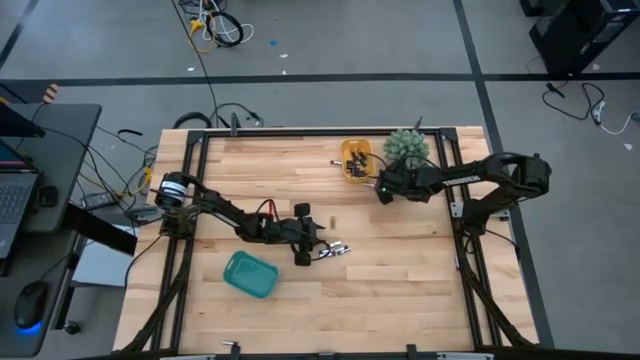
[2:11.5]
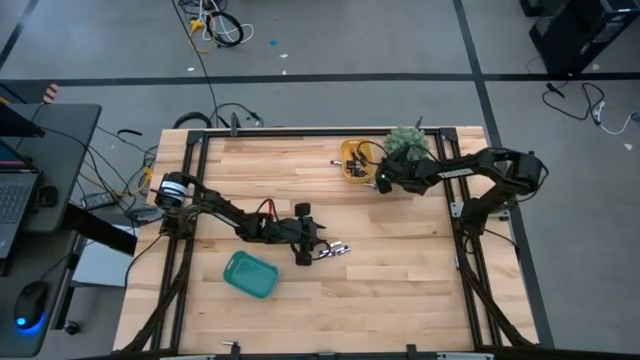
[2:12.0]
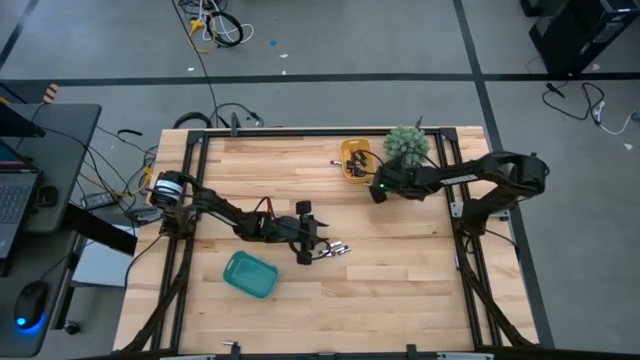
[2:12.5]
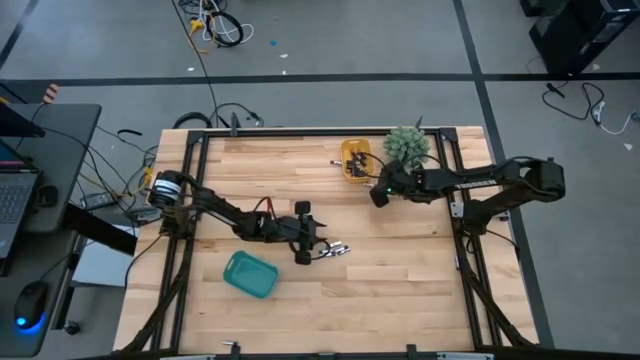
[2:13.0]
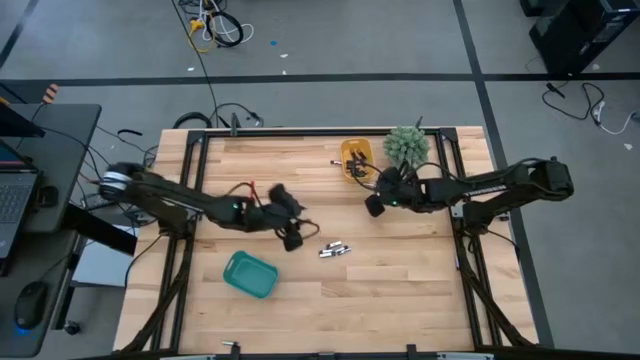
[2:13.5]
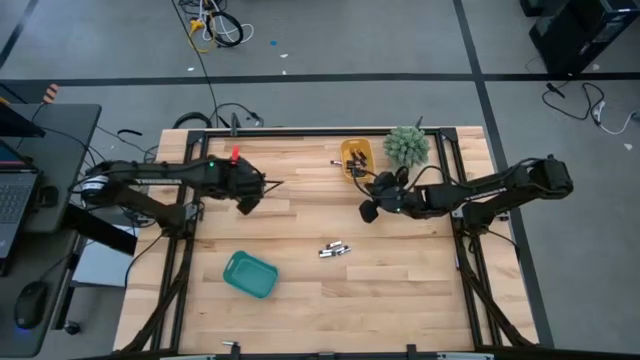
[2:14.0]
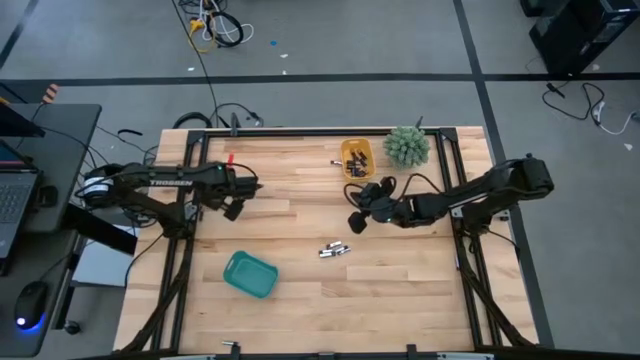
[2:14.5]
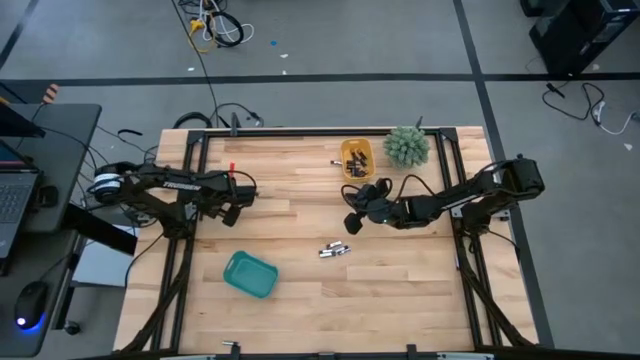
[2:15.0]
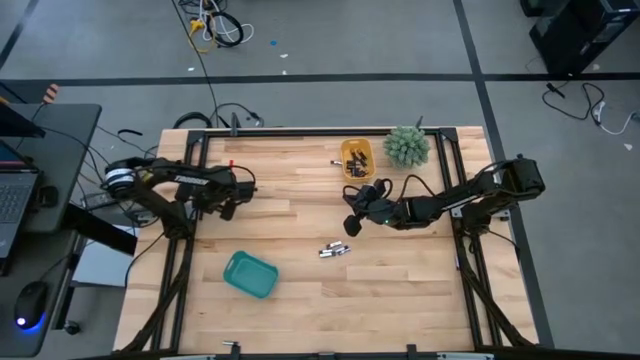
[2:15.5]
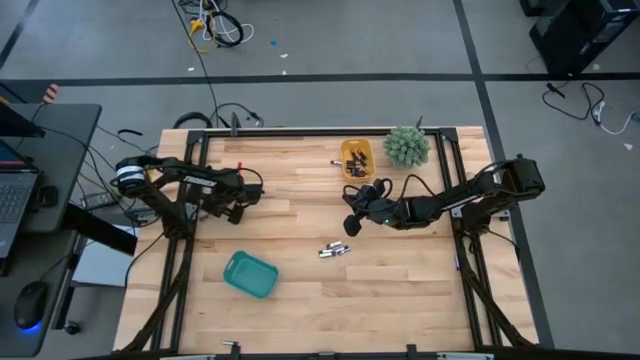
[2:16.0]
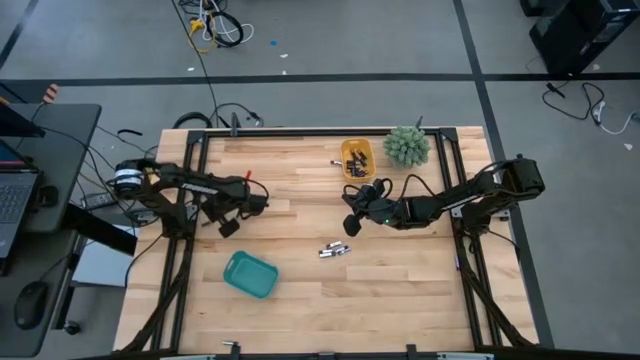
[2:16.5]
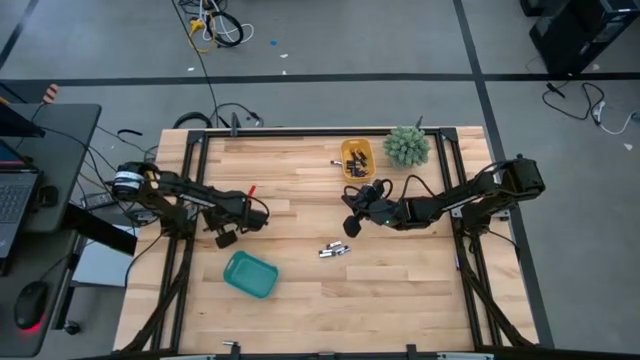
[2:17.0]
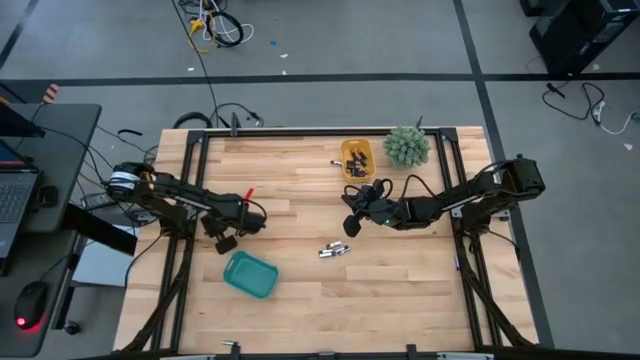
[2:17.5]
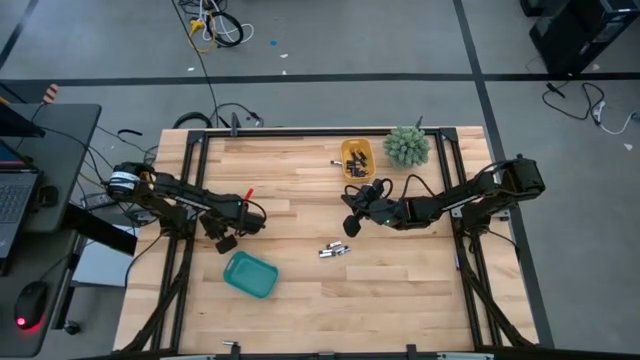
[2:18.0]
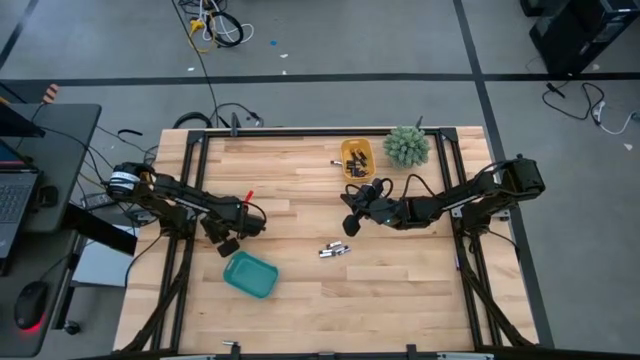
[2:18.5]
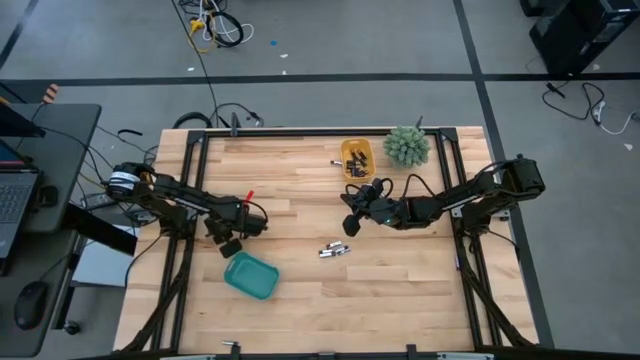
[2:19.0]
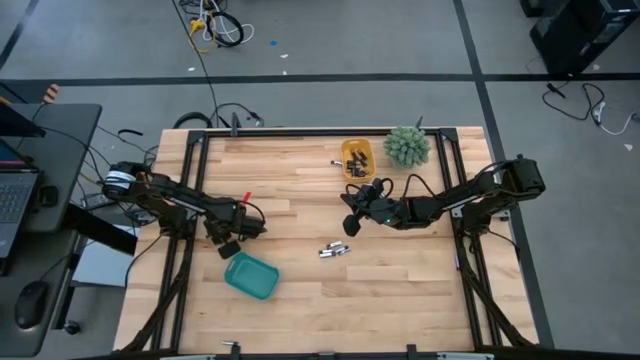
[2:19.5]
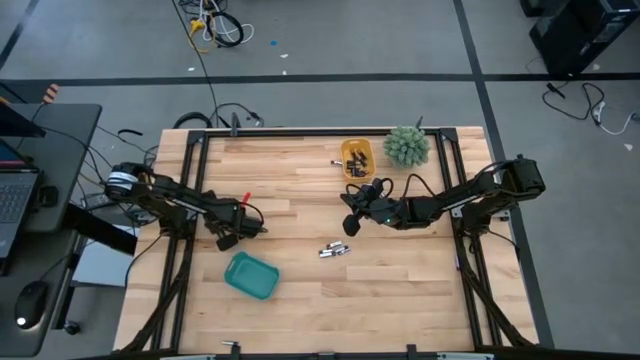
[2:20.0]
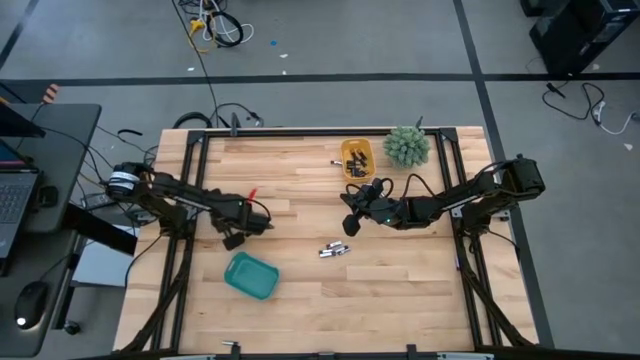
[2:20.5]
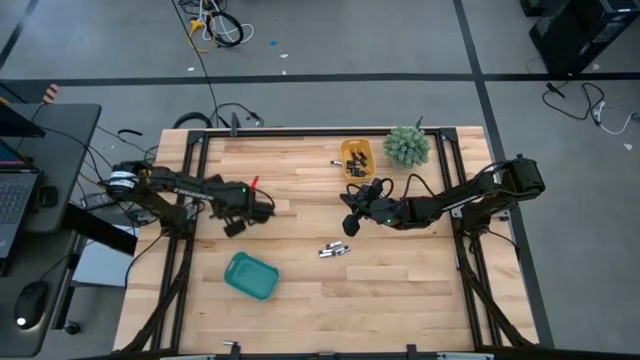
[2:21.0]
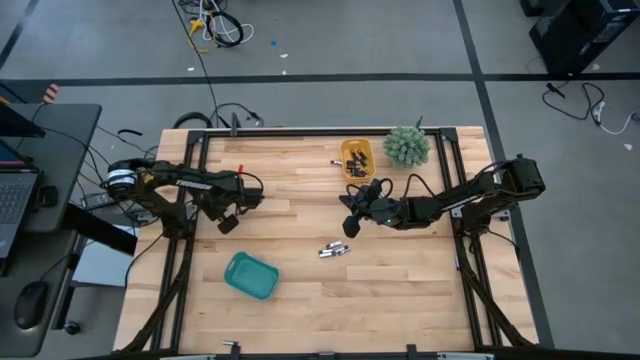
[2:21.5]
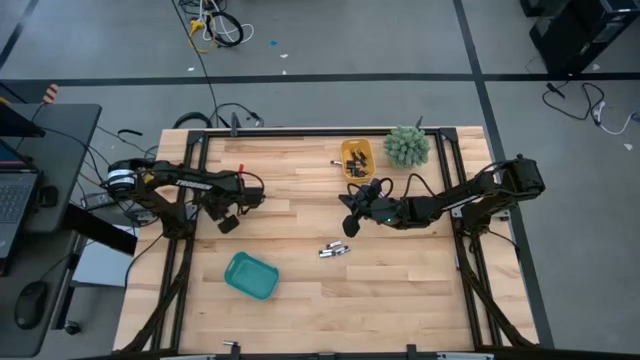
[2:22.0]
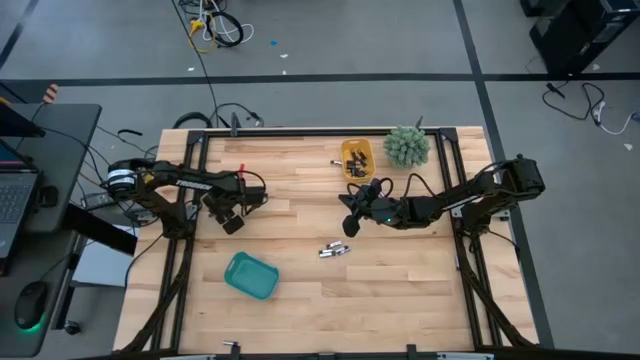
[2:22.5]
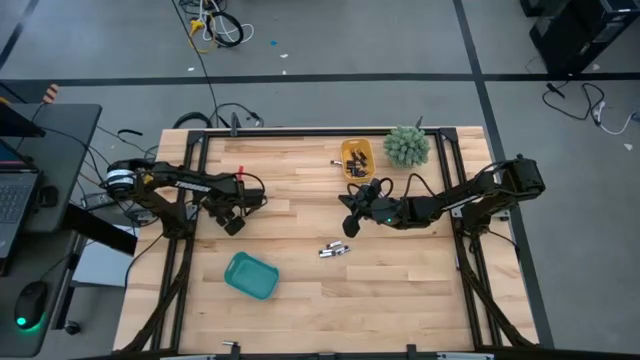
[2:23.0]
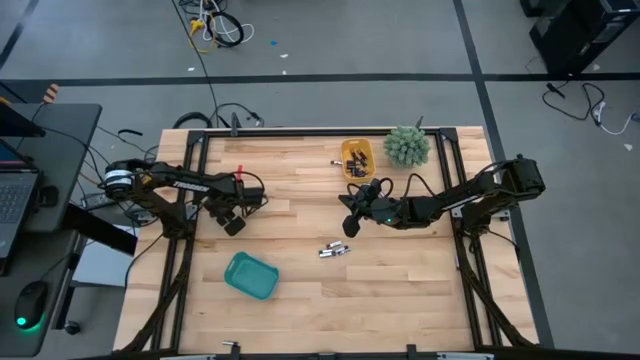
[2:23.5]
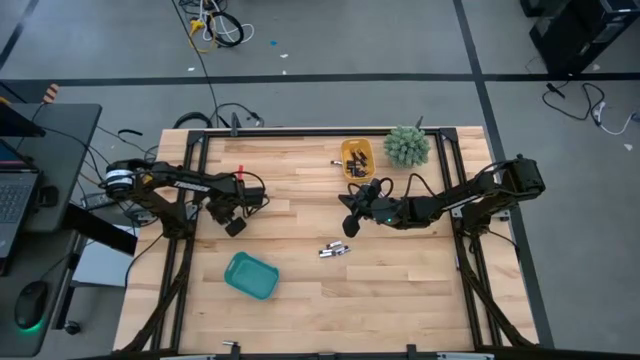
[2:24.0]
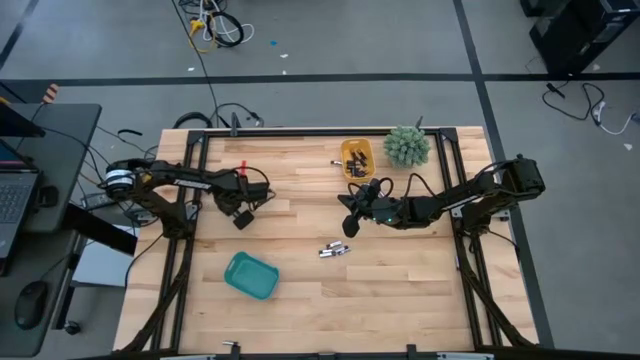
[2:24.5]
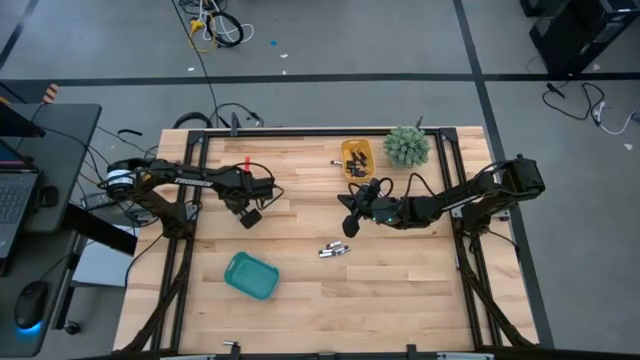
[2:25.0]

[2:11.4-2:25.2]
Task: Sort batteries
Put the black battery into the yellow bin

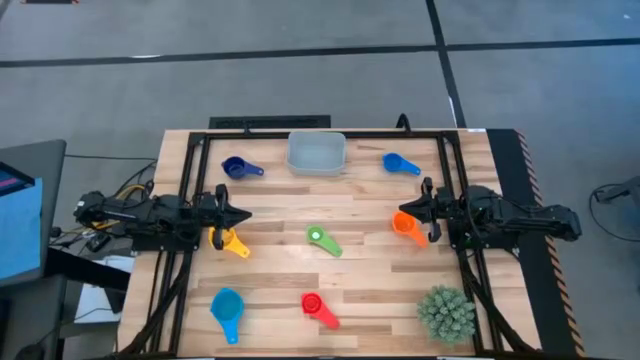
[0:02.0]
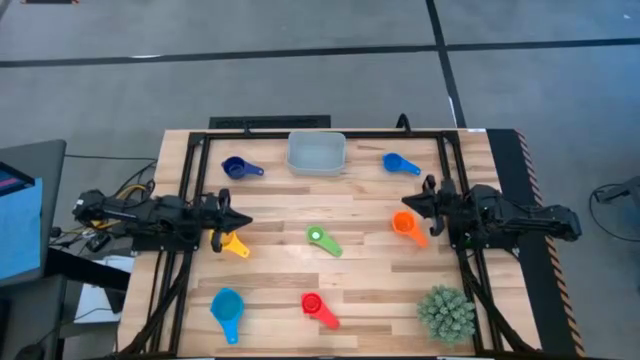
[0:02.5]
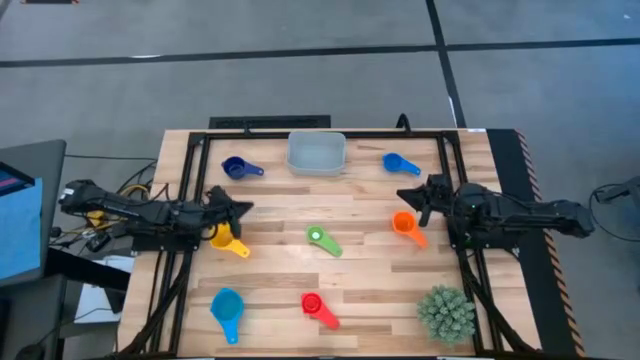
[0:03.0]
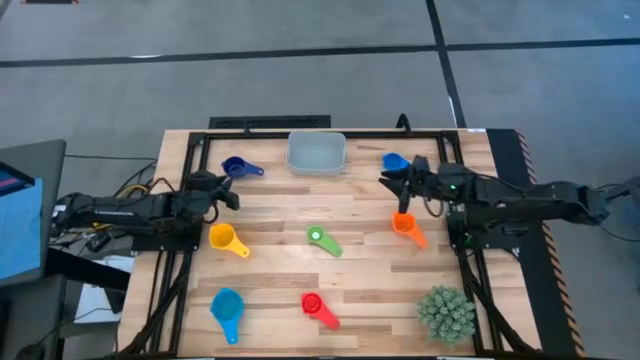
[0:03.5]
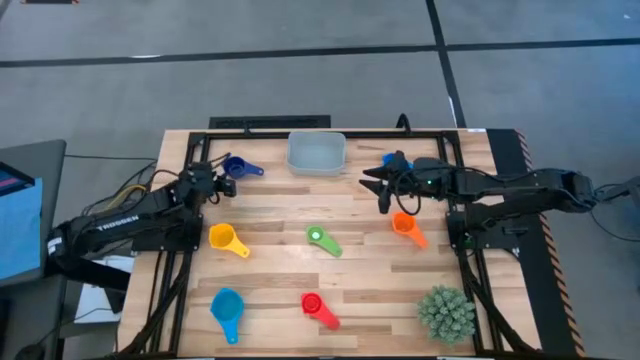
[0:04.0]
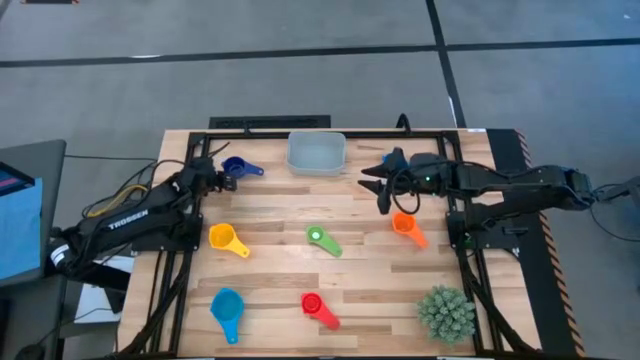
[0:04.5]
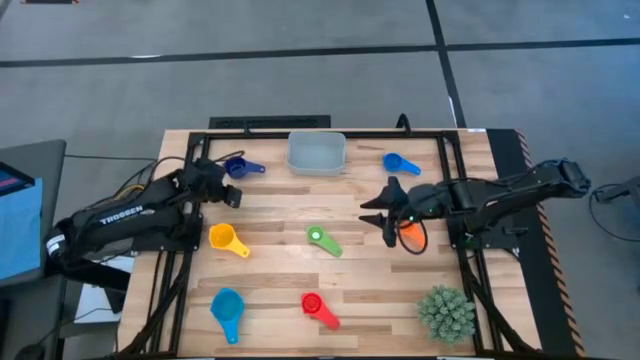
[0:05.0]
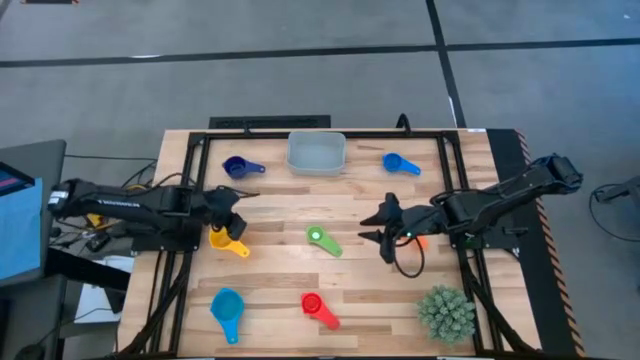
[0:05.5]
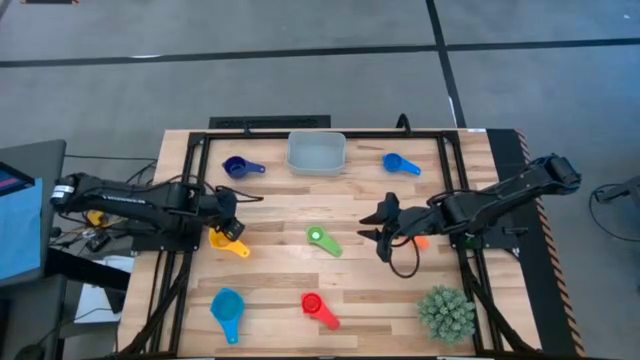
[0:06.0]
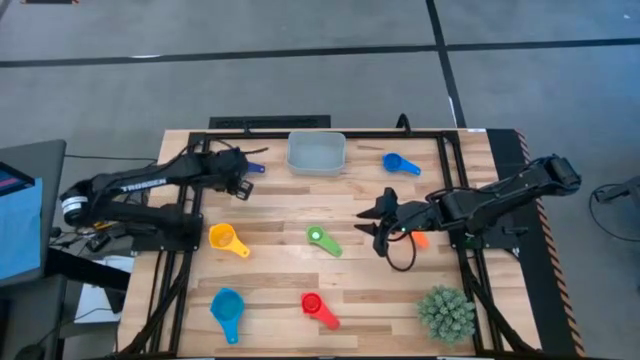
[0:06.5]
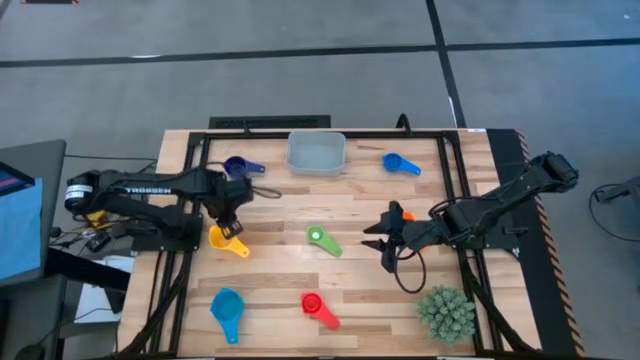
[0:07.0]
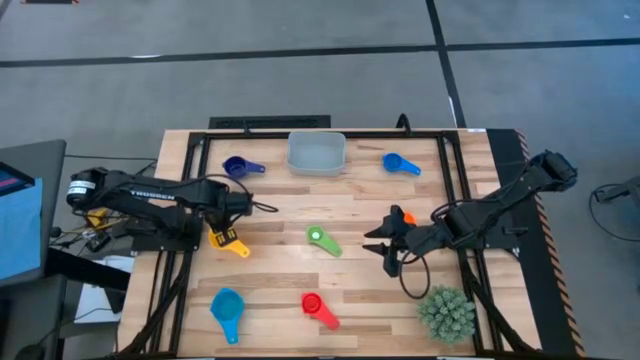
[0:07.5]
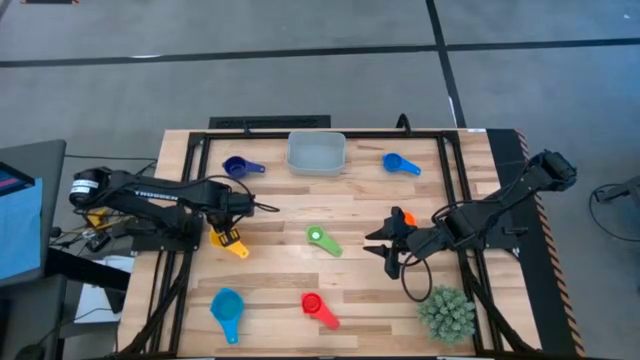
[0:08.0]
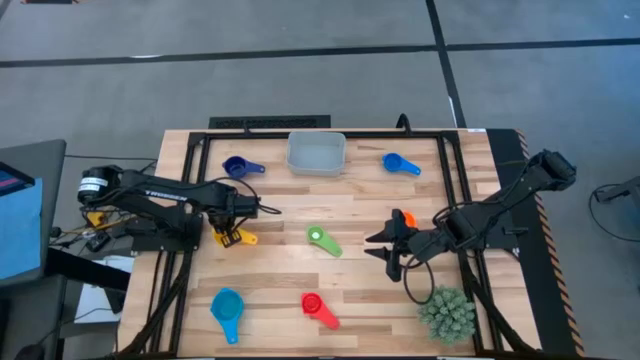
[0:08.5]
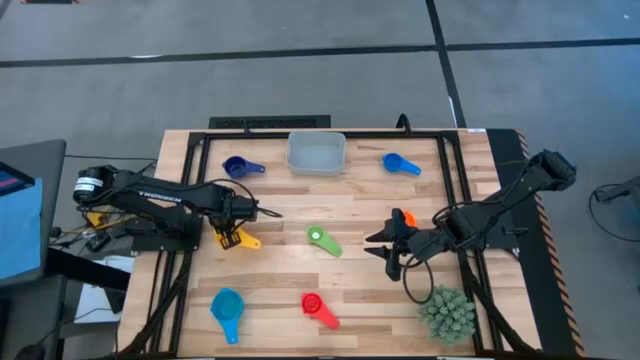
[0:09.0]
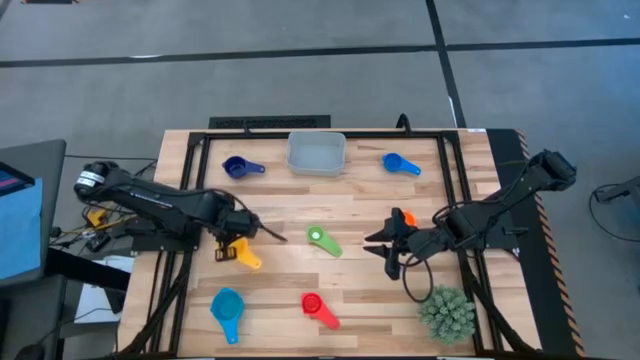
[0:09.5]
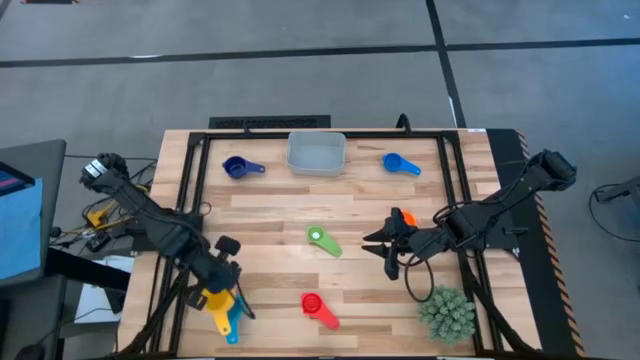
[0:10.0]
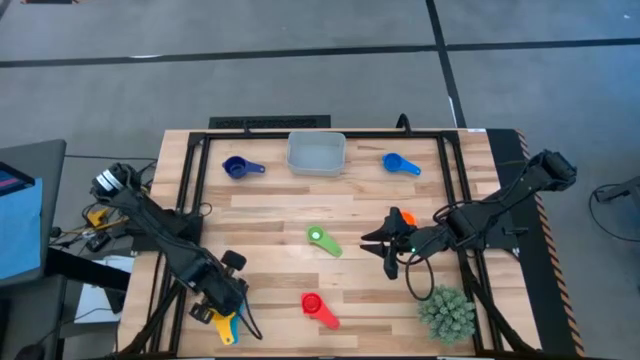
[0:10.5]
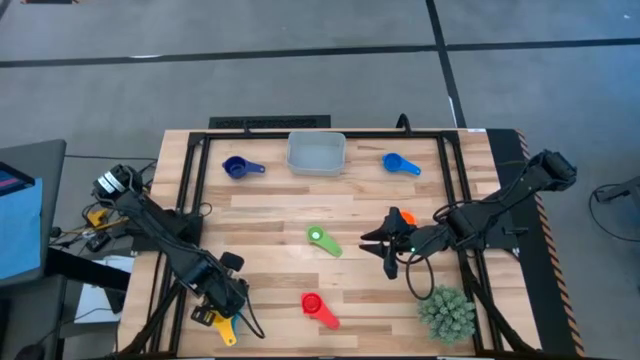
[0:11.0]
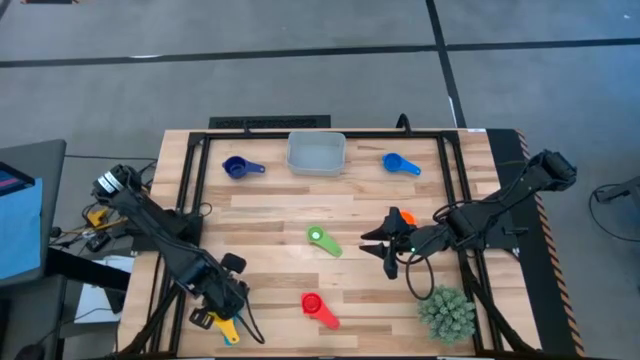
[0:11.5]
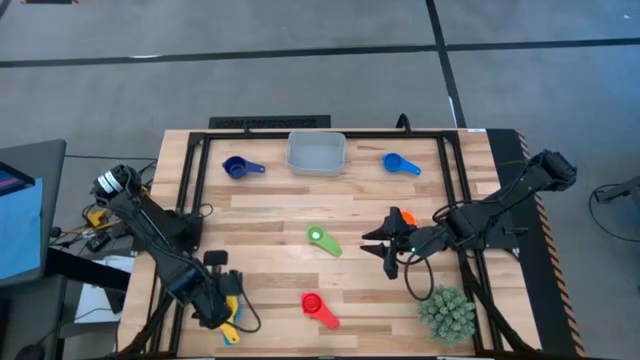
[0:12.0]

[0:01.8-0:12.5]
Task: Nest measuring cups in basket
Stack the yellow measuring cup on top of the light blue measuring cup
